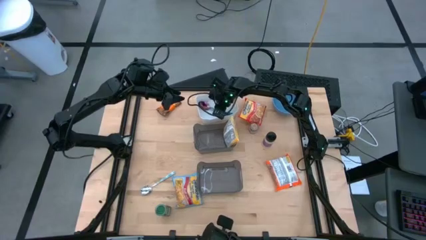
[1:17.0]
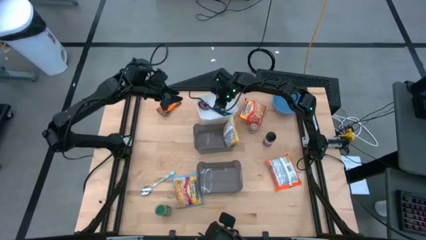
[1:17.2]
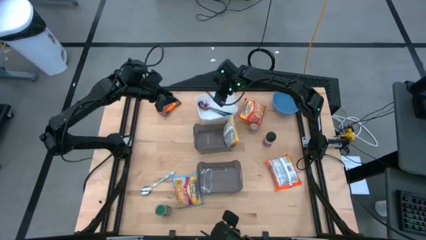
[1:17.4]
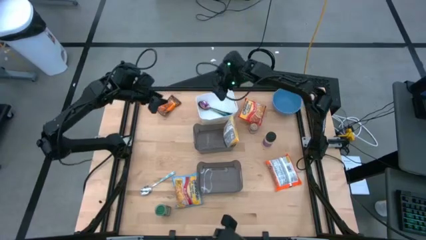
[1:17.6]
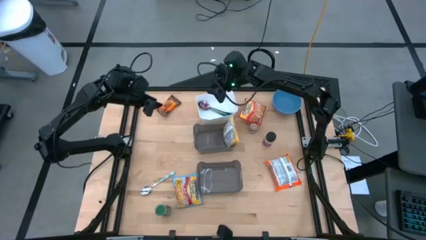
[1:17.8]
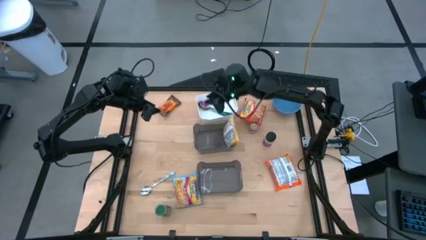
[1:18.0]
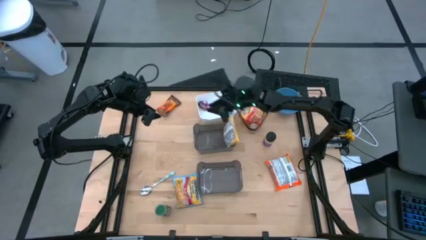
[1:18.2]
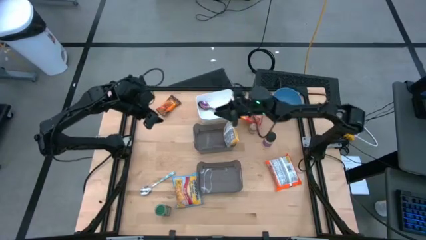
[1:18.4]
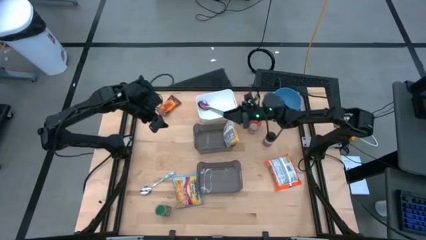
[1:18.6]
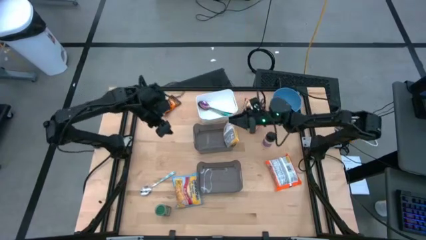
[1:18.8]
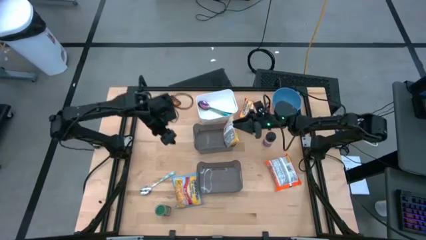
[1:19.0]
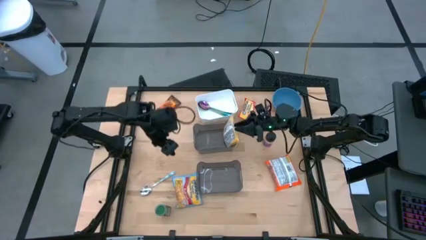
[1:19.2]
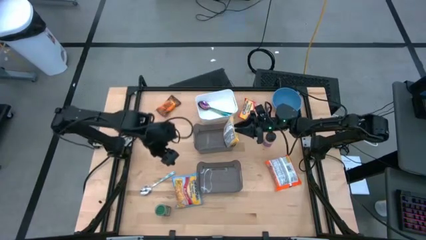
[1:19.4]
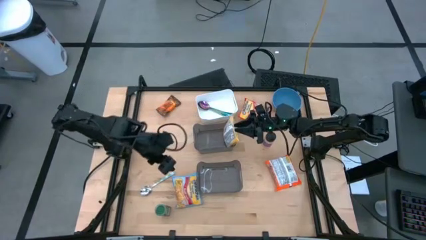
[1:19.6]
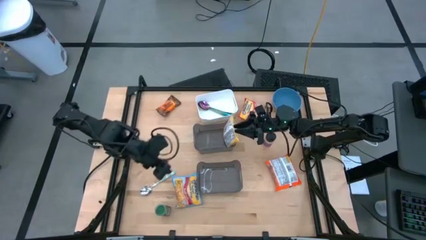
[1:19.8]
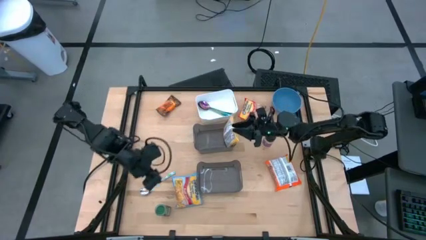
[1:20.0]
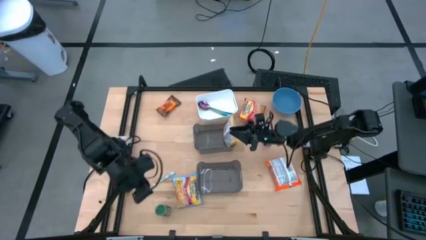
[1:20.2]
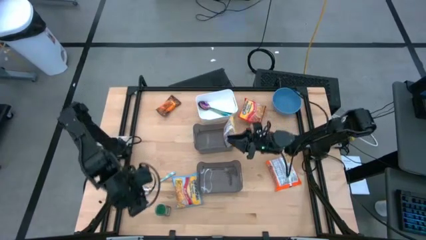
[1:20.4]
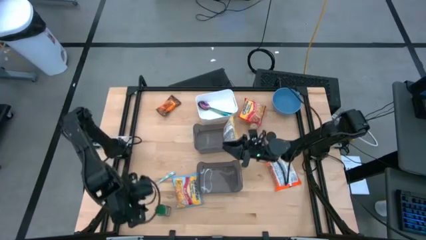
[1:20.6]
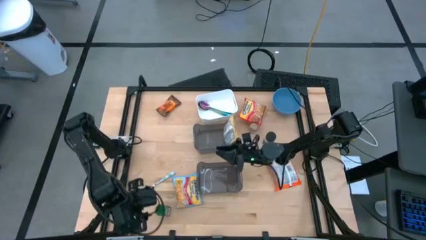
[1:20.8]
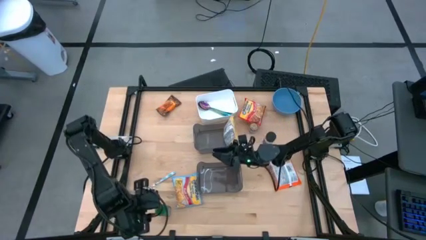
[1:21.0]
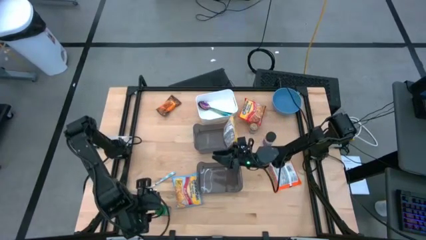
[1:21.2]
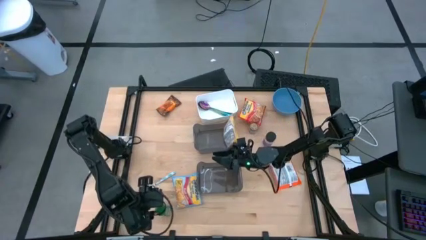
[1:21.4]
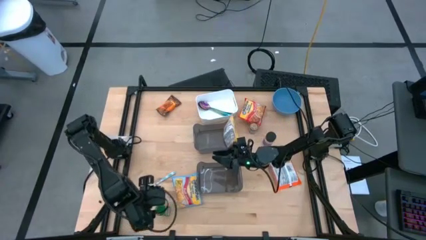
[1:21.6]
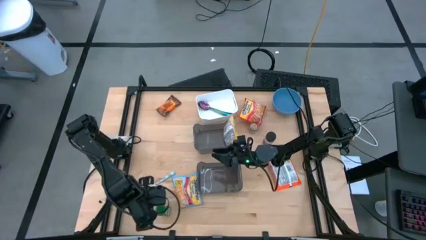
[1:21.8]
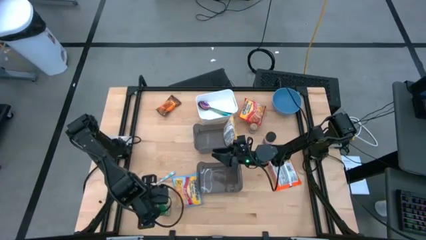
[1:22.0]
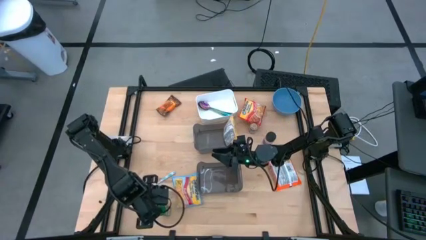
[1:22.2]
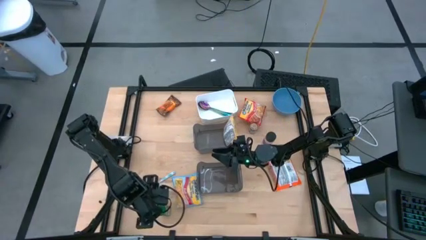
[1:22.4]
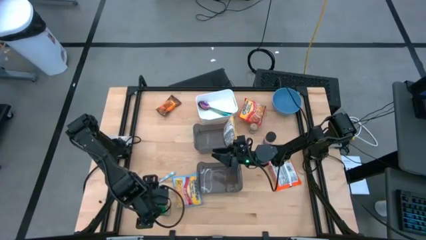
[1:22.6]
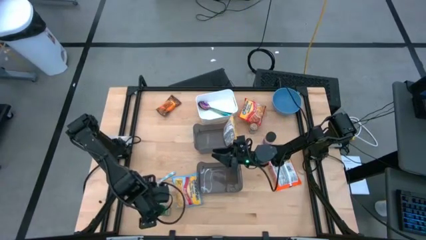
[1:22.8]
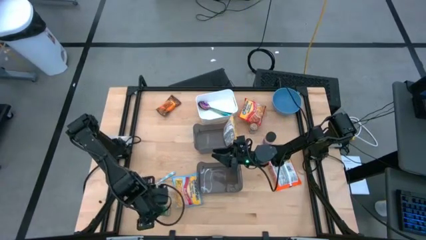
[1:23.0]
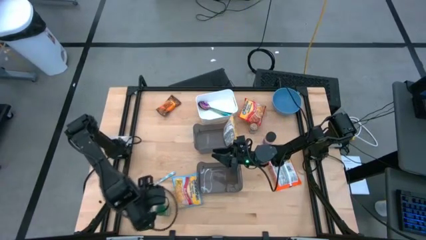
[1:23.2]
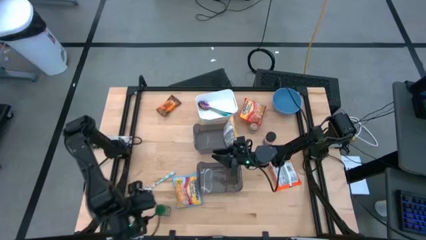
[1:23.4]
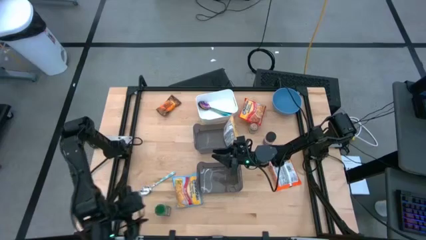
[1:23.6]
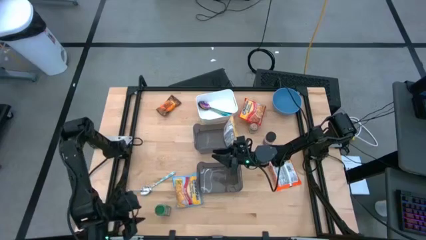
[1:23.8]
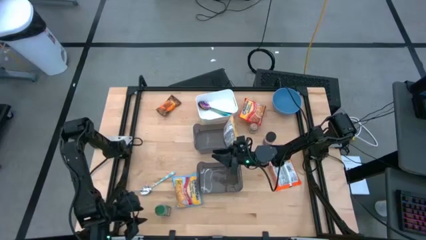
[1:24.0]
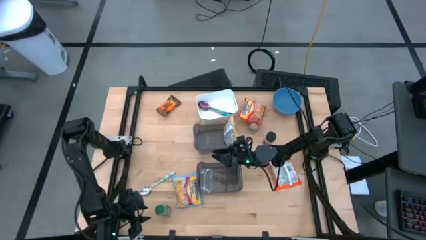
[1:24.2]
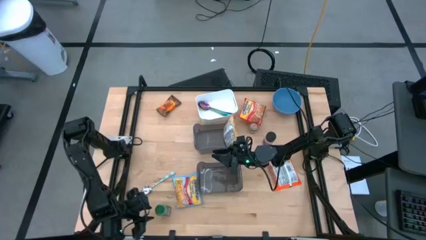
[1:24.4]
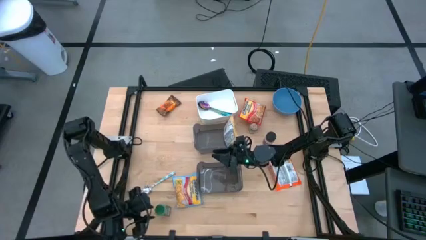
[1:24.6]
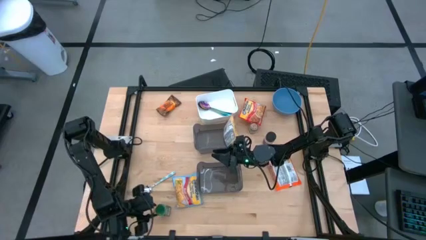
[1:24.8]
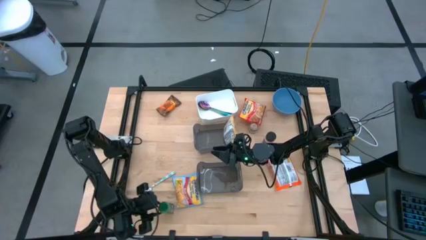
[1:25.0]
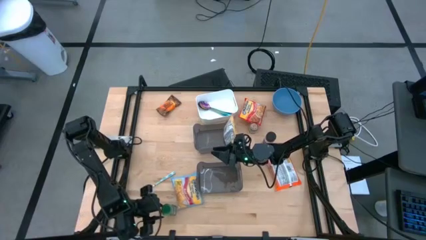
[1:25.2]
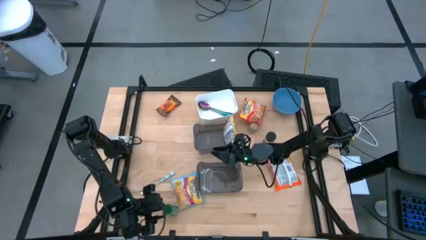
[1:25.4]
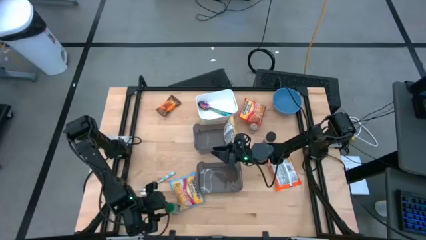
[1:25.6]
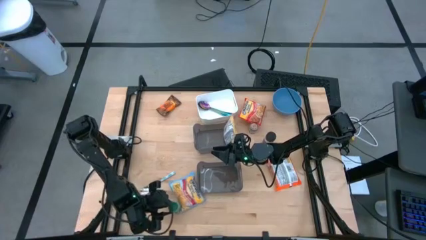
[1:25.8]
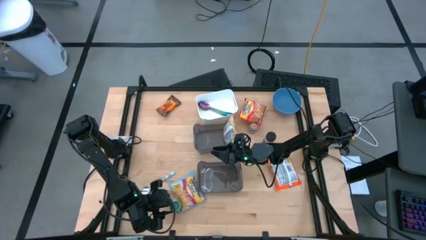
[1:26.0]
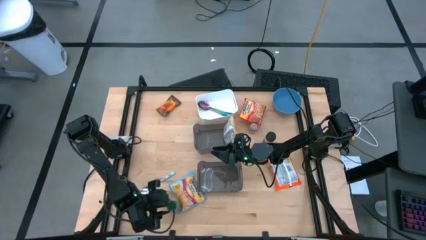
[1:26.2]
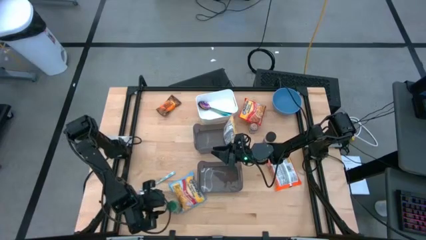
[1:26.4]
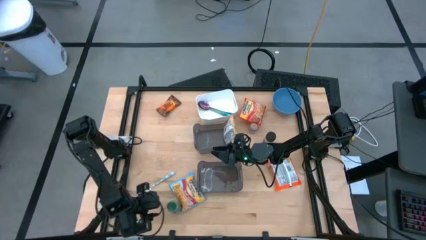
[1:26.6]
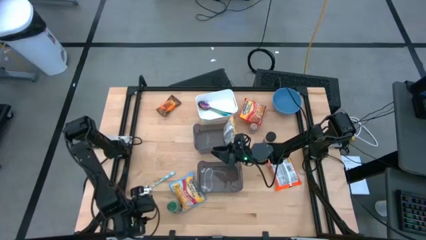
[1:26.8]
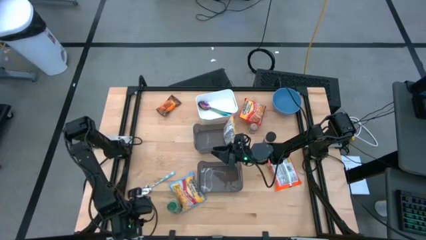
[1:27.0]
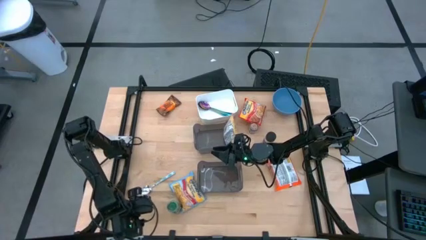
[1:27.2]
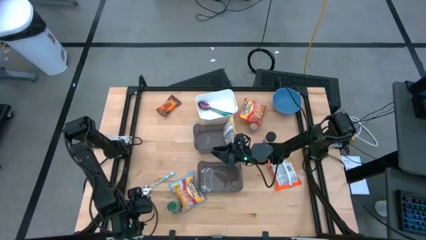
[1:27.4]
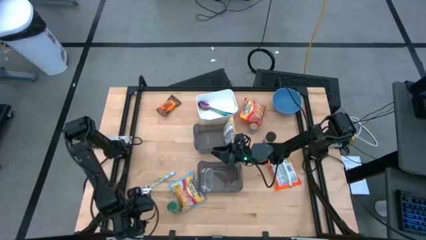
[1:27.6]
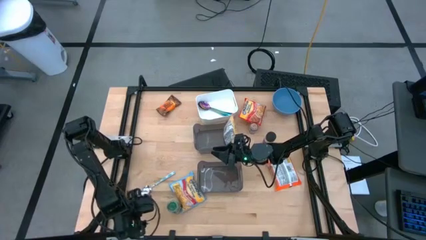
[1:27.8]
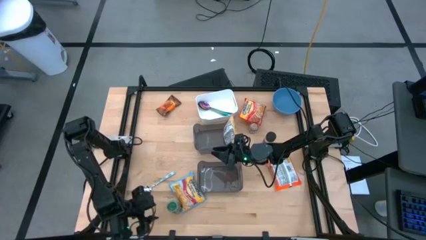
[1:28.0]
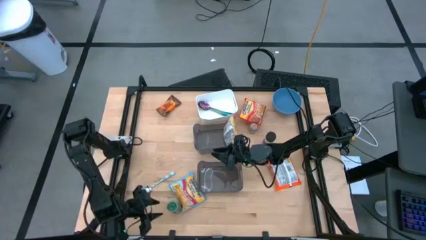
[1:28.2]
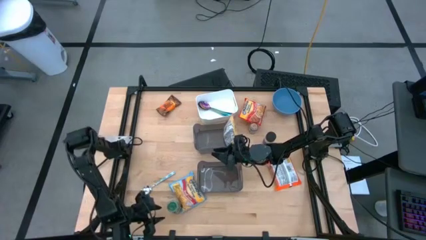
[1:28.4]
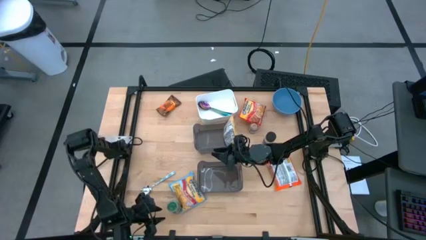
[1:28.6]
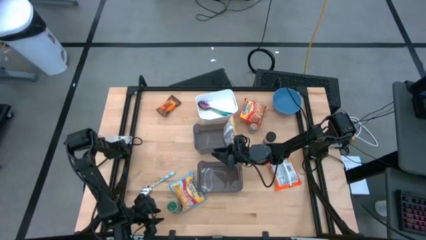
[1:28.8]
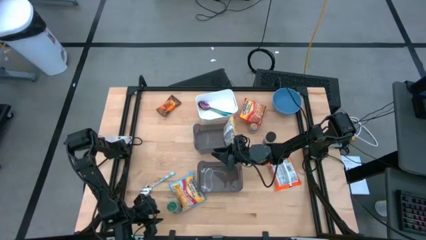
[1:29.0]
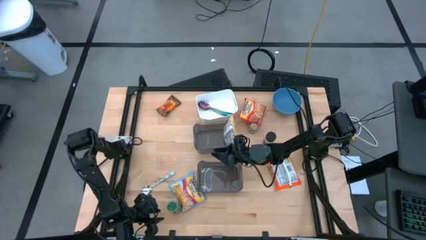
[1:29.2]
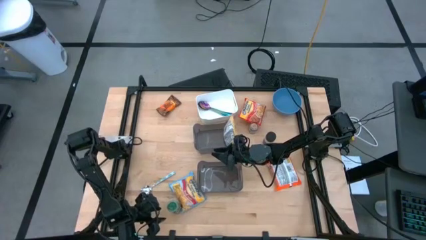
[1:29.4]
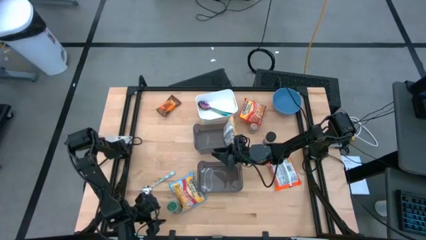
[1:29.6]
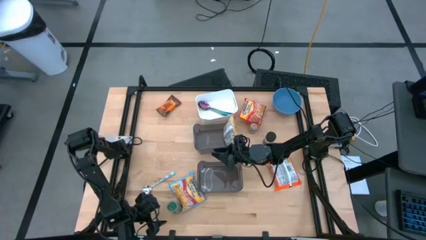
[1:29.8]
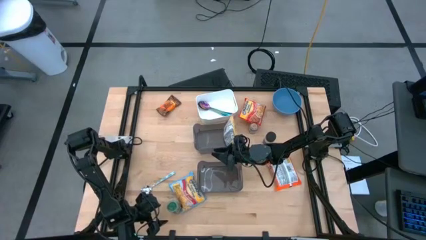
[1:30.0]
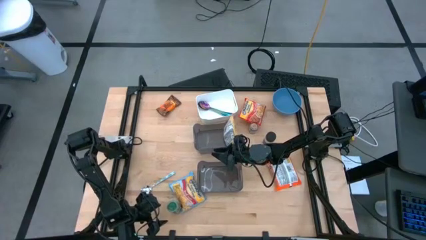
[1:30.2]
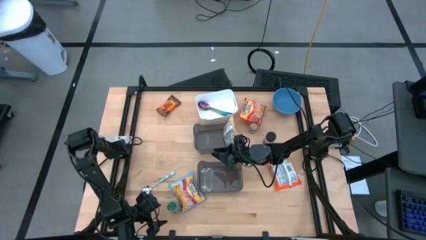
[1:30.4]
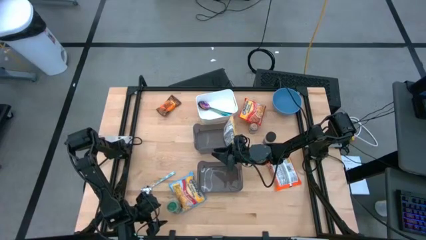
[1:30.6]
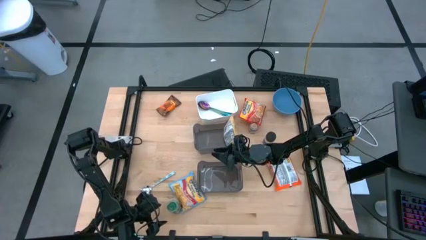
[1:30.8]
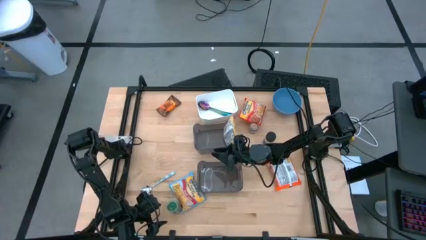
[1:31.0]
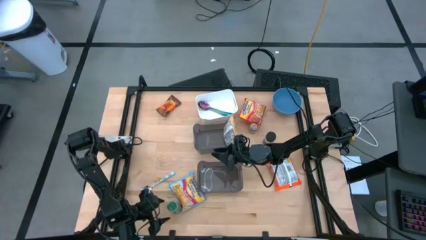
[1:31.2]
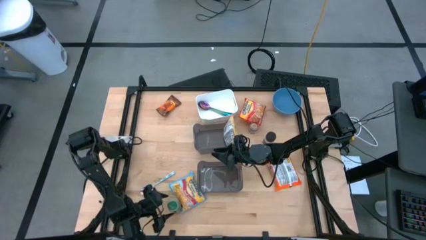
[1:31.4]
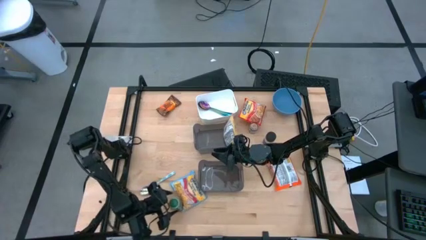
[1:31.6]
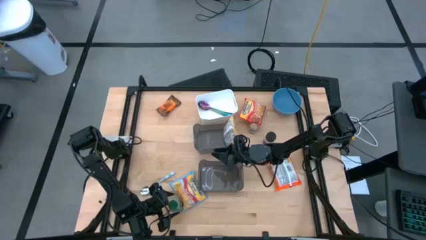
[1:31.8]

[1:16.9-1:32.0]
Task: Pick & Place Food Item
Put the green seasoning bottle into the bottom black bin
